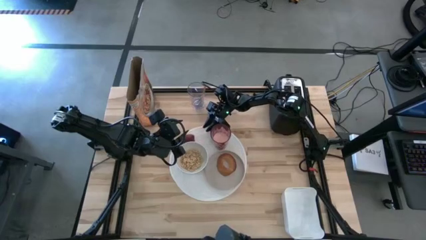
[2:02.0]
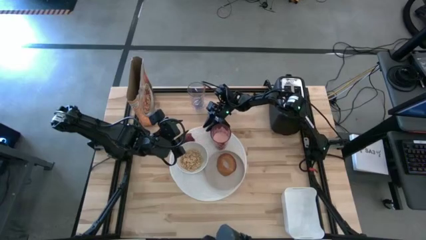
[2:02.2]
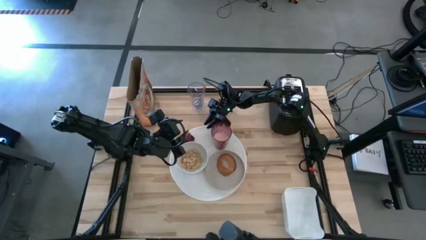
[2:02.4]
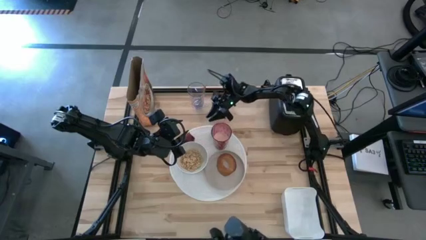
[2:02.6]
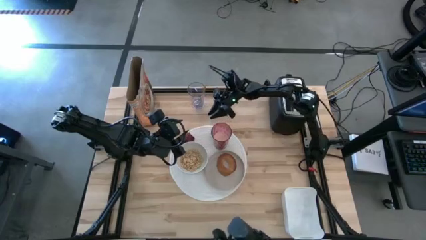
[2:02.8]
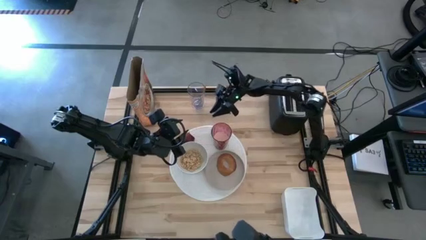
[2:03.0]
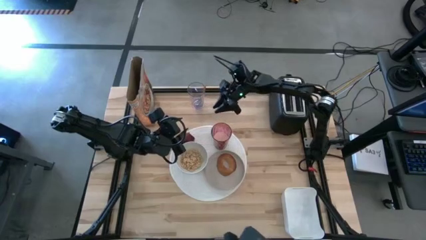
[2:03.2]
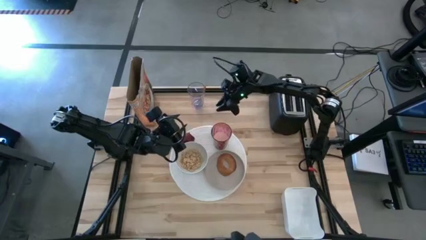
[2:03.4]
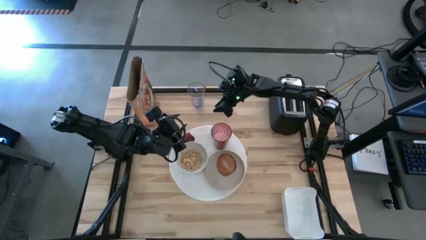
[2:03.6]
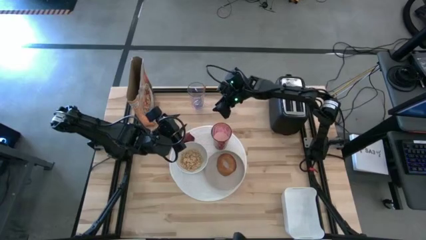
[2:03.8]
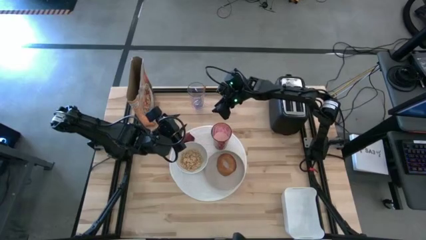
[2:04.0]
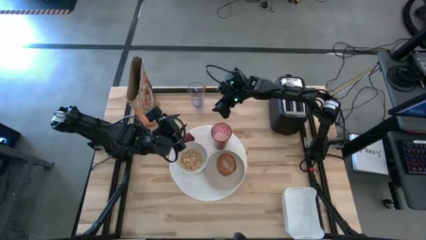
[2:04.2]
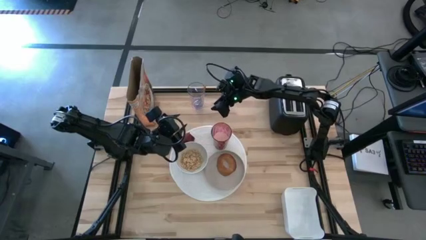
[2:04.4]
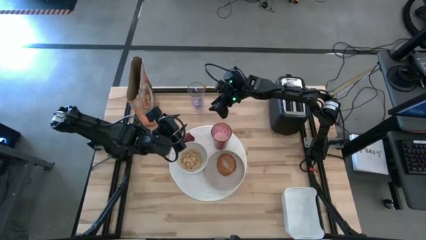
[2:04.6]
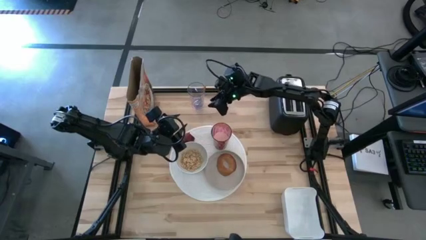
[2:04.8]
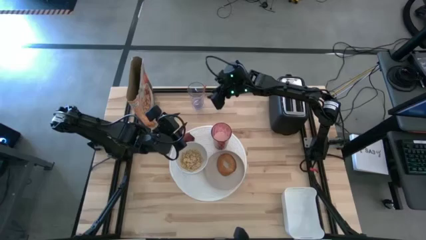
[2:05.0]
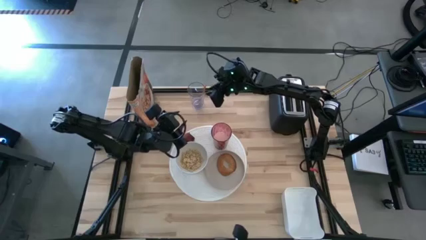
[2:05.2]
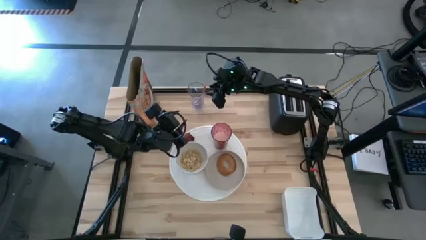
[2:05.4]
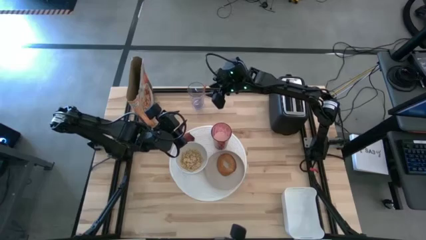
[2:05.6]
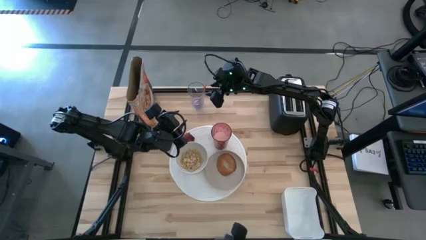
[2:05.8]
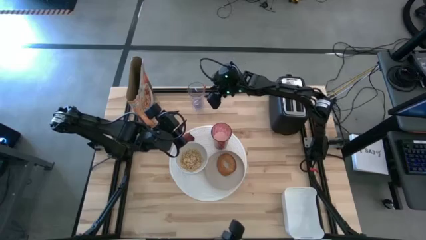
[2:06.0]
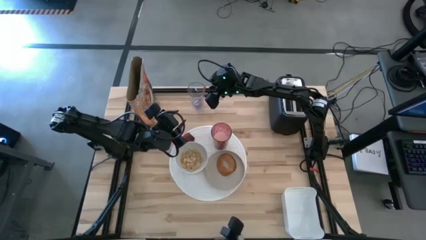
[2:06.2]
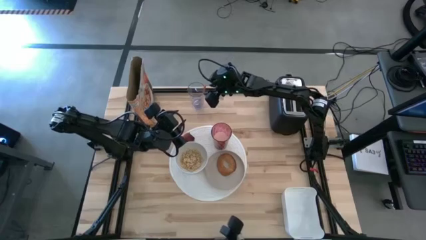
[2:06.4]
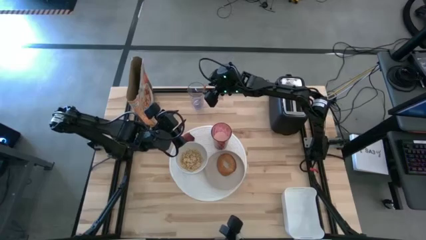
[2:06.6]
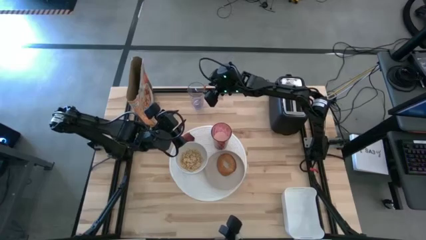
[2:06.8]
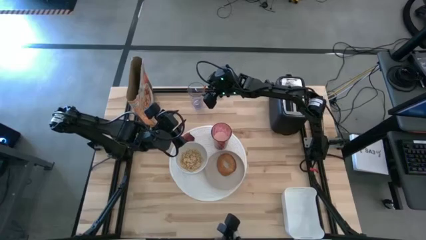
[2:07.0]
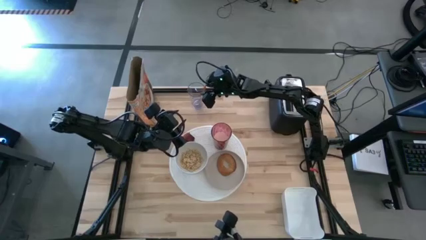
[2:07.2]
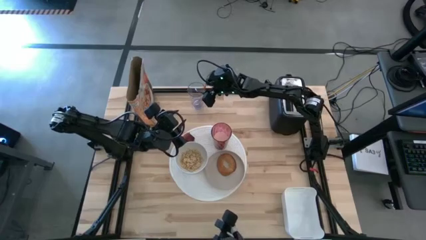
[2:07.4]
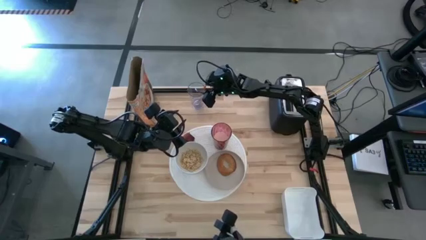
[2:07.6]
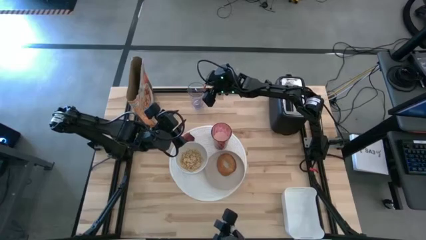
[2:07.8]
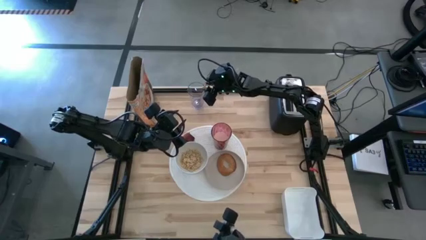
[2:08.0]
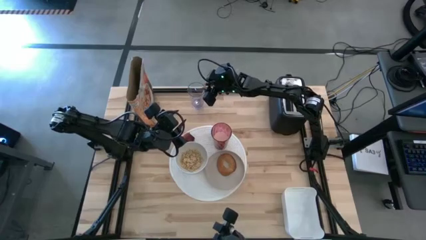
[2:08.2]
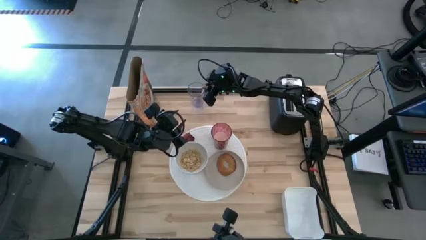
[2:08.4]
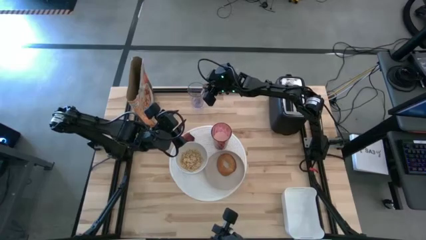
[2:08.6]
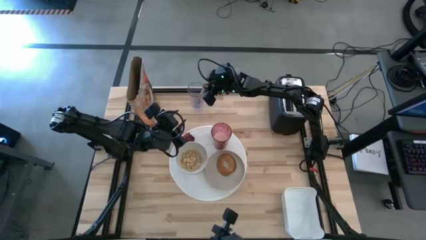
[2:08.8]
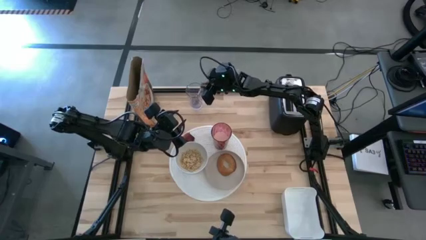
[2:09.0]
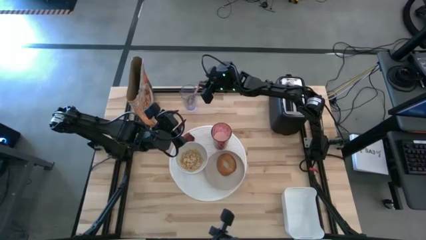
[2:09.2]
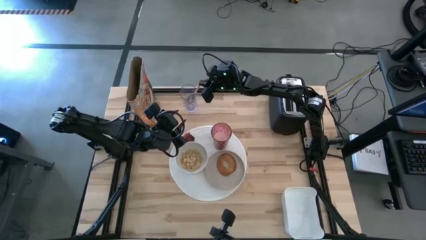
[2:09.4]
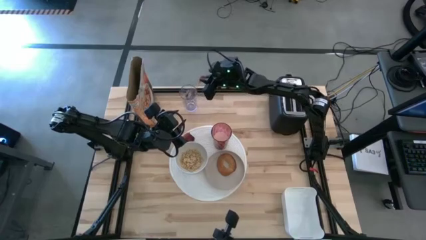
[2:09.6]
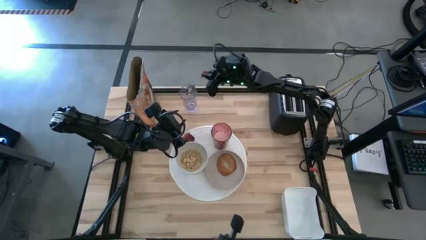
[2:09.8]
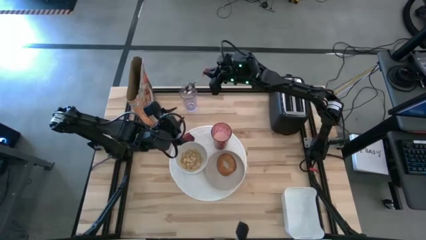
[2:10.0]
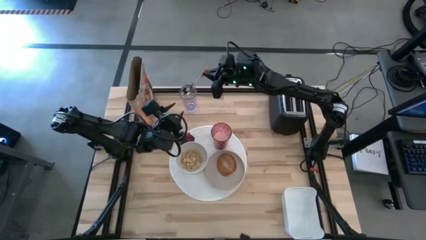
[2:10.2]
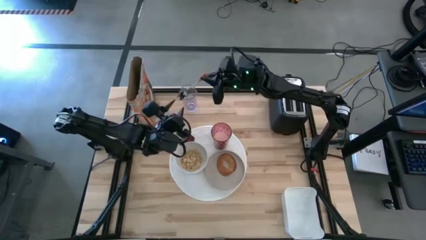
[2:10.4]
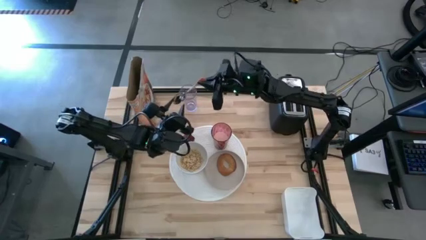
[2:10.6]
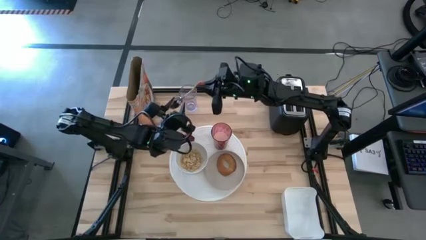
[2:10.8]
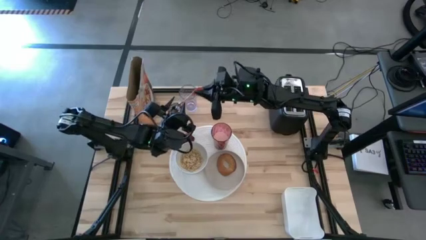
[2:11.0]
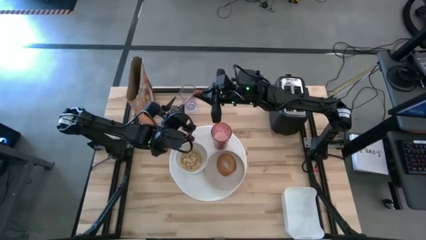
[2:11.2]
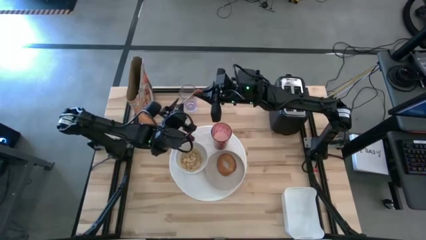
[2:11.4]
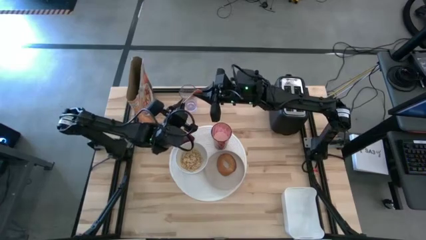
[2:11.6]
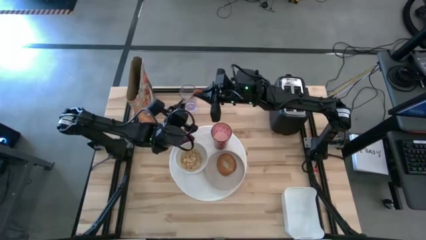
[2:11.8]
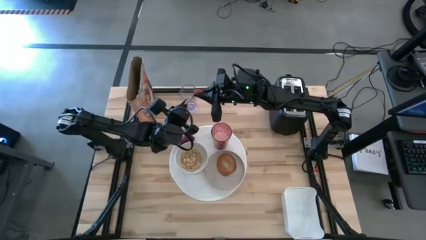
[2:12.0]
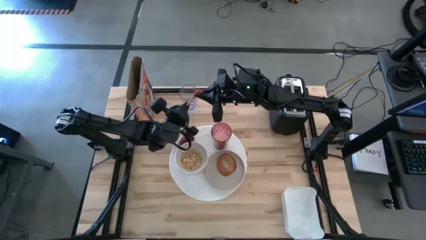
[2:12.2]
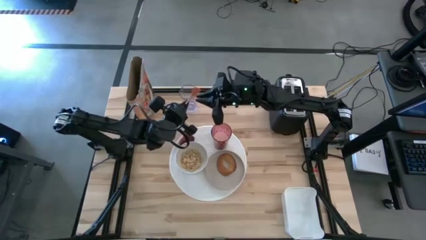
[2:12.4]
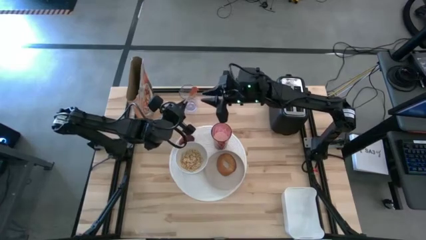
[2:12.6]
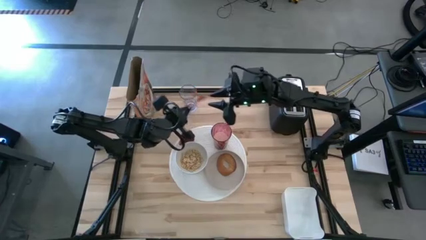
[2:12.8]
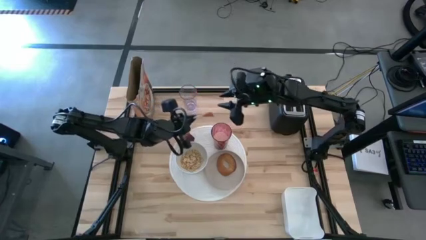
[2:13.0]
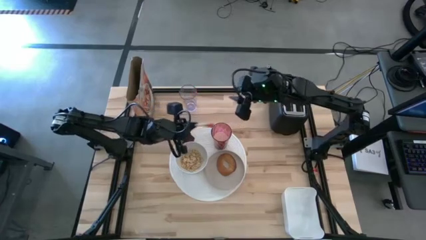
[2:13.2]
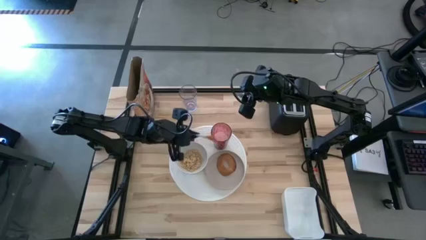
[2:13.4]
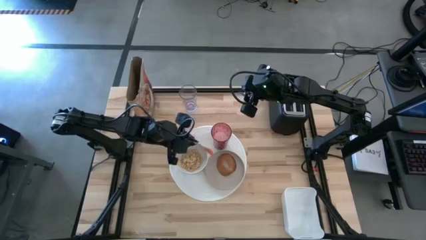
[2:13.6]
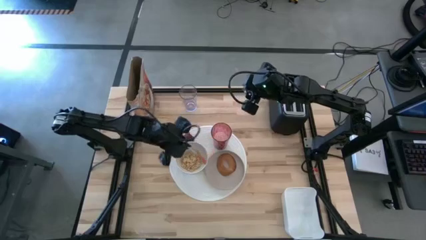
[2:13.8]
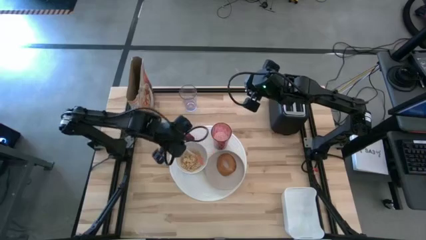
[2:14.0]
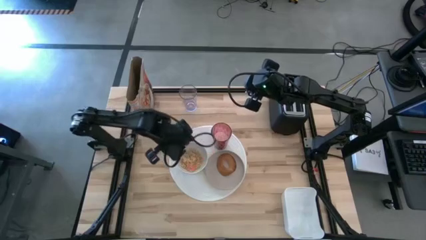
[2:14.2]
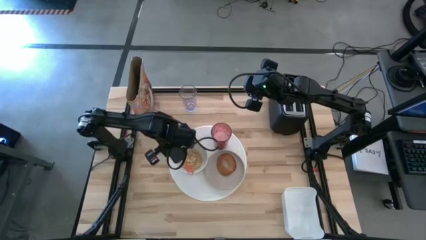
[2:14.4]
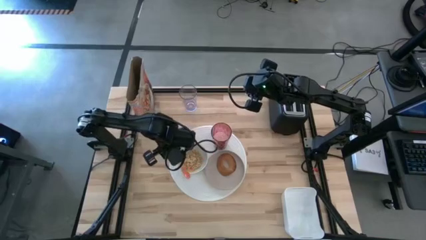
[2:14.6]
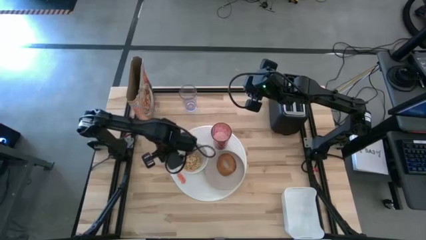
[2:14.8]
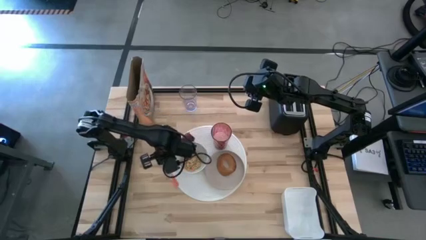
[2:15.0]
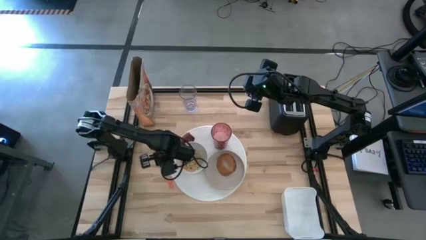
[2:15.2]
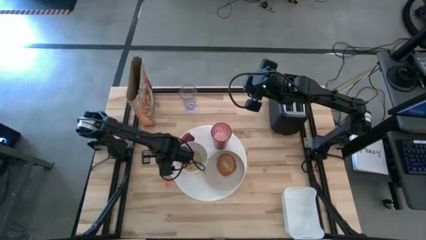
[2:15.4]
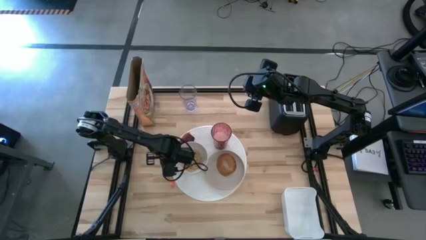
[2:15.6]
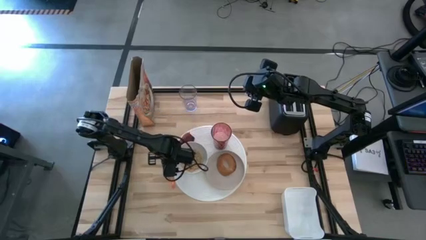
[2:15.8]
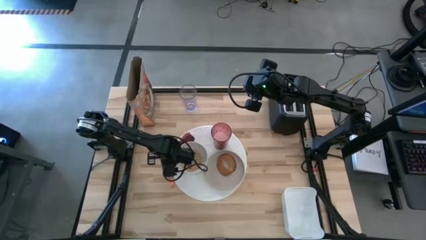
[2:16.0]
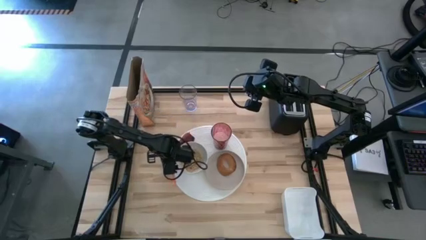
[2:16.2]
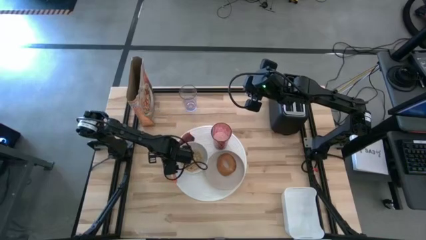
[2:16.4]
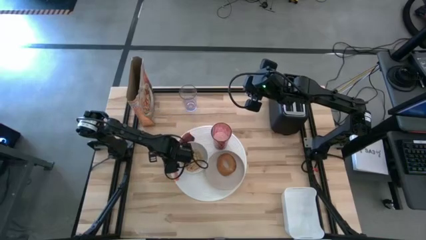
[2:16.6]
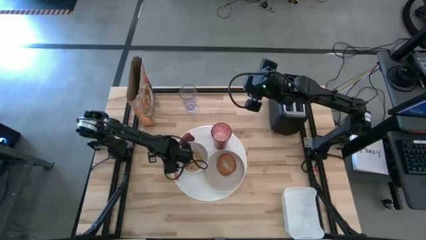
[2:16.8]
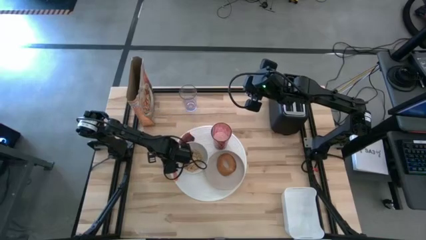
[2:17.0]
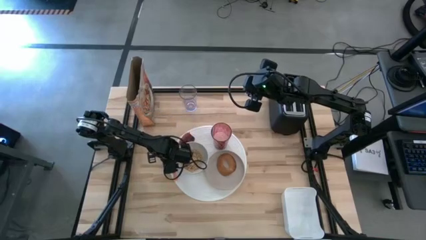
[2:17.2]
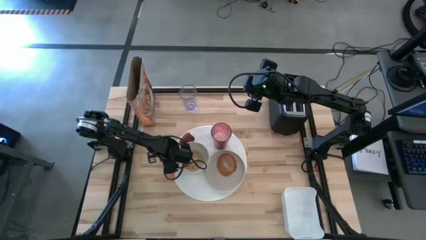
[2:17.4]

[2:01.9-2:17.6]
Task: Arrange a breakfast setting
Move the orange spoon to the middle left of the table

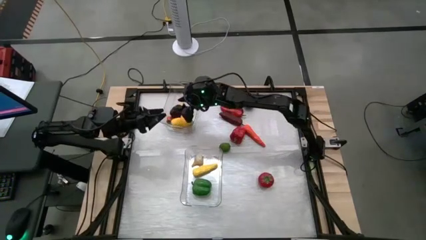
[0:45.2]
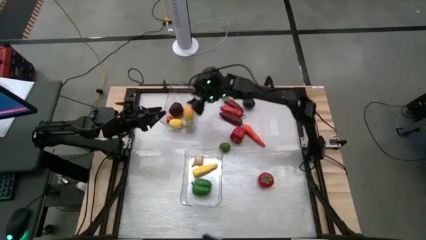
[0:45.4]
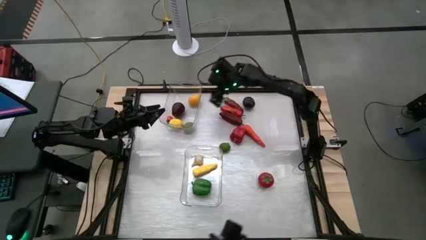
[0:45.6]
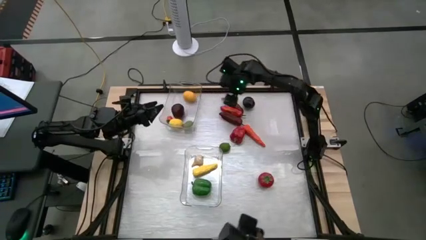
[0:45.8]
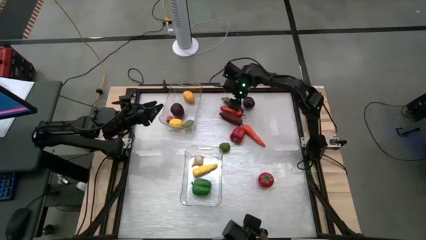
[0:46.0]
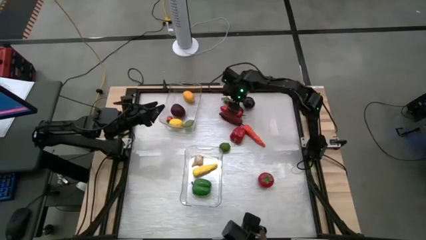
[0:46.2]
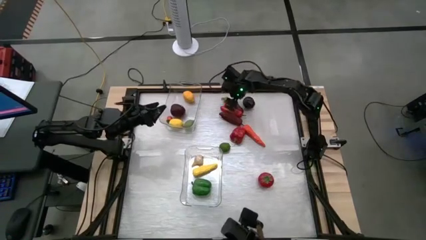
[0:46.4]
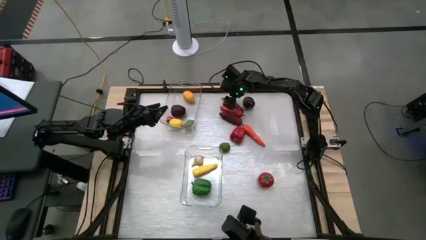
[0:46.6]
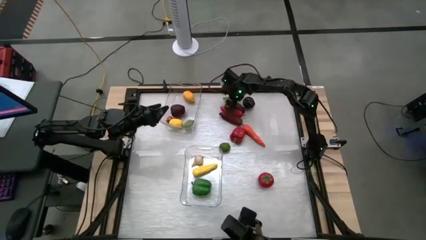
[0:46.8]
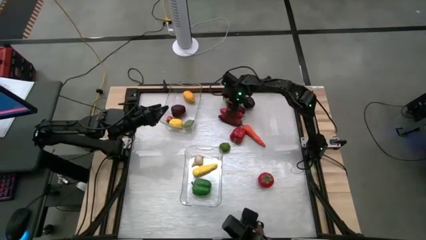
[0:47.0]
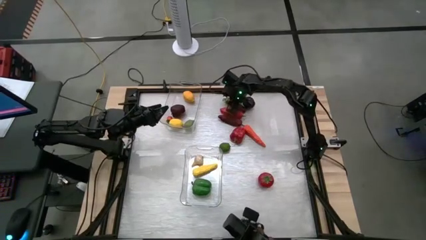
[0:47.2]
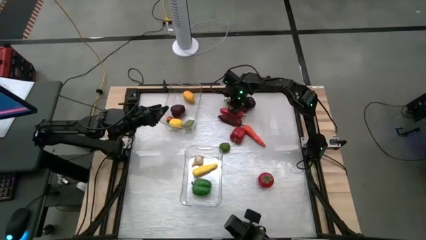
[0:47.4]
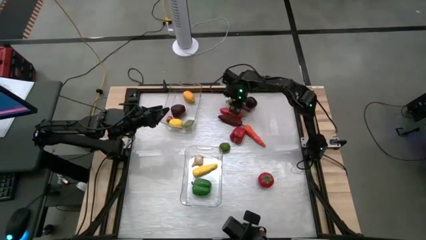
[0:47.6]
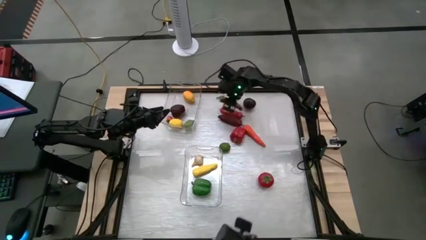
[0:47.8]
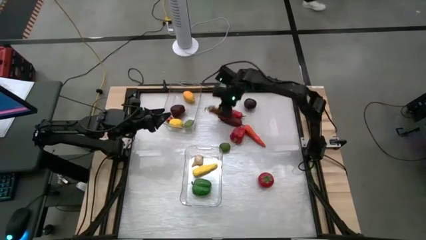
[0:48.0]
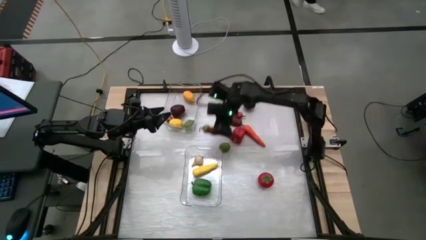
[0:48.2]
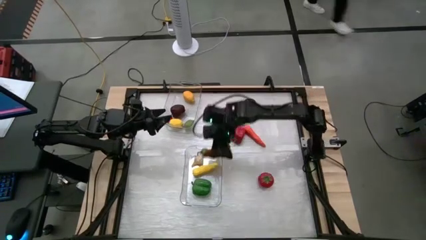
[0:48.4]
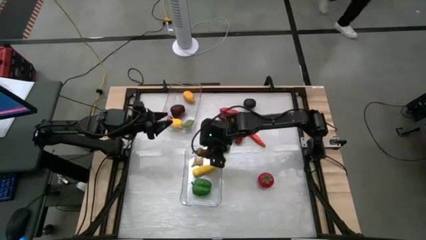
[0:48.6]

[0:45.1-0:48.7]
Task: Sort produce into baskets
Put the top dark red chilli pepper into the bottom transparent bin
